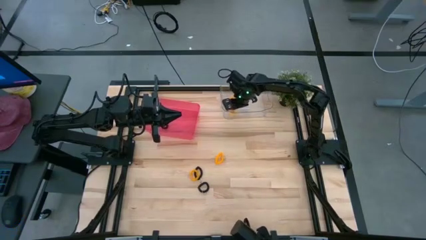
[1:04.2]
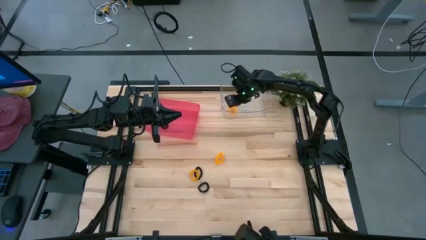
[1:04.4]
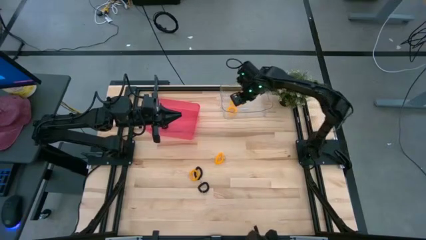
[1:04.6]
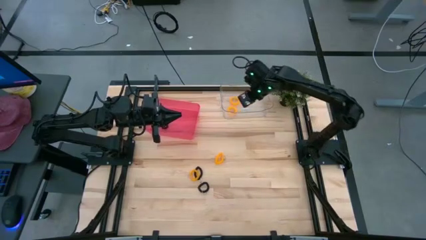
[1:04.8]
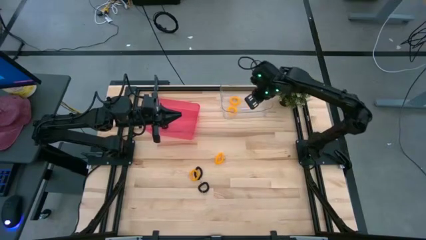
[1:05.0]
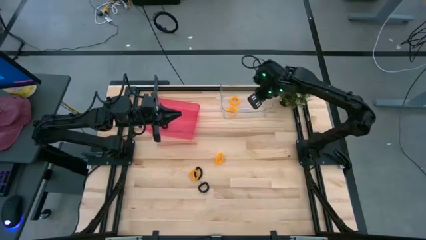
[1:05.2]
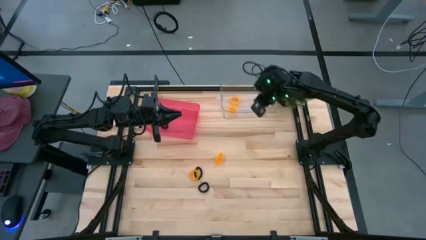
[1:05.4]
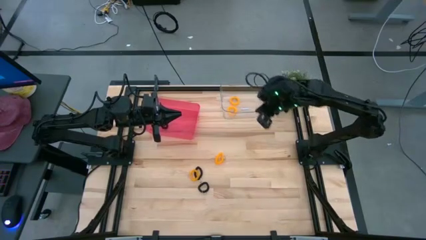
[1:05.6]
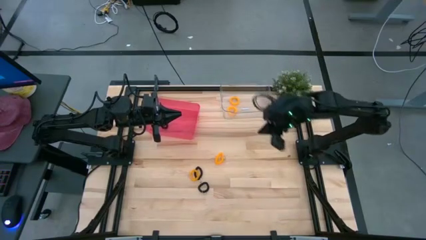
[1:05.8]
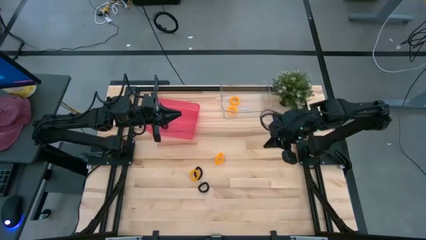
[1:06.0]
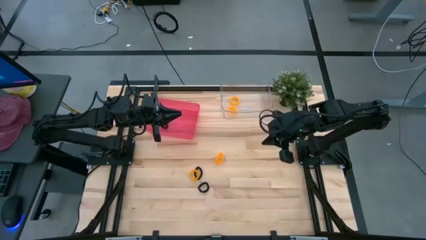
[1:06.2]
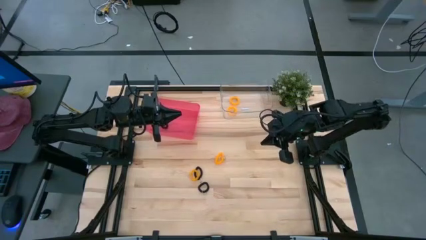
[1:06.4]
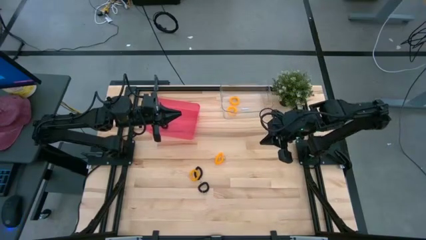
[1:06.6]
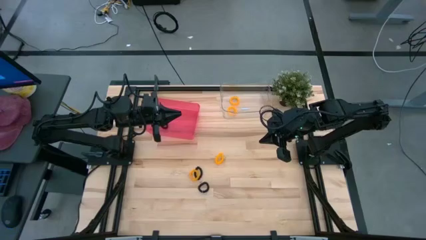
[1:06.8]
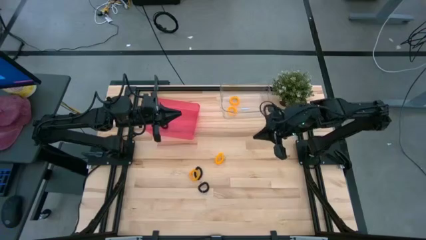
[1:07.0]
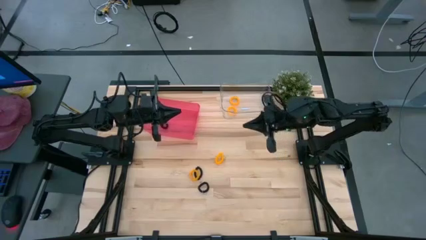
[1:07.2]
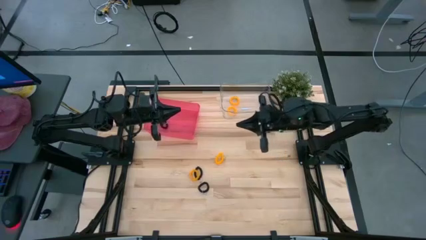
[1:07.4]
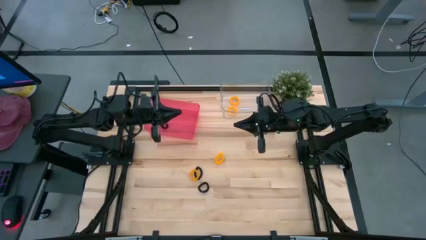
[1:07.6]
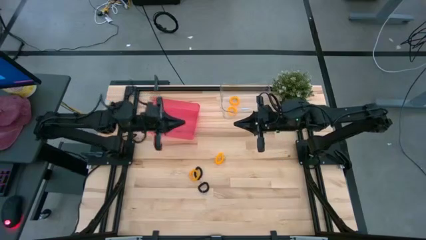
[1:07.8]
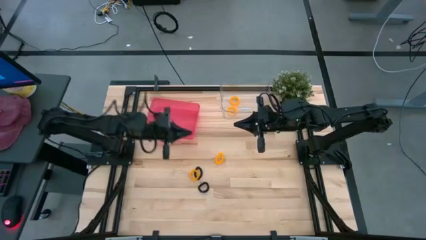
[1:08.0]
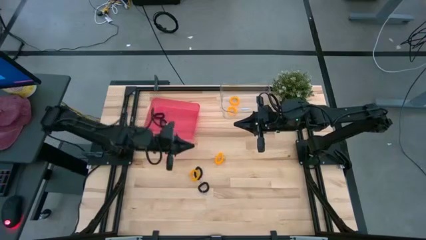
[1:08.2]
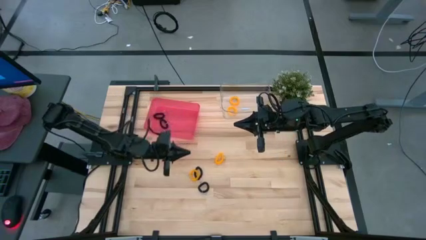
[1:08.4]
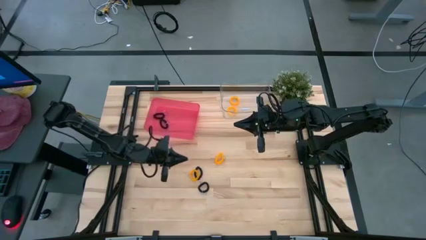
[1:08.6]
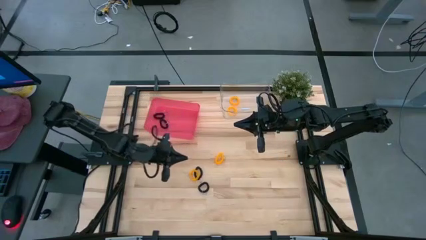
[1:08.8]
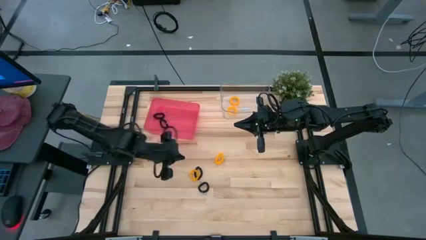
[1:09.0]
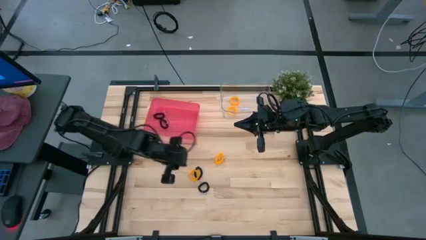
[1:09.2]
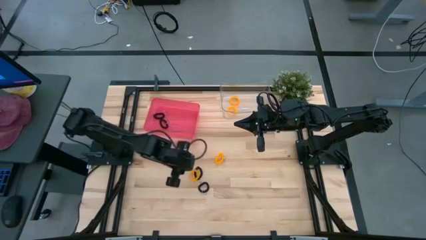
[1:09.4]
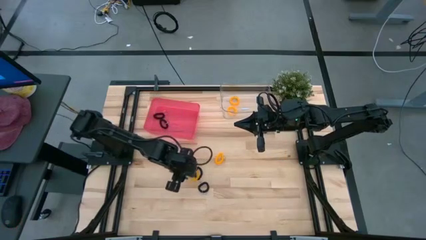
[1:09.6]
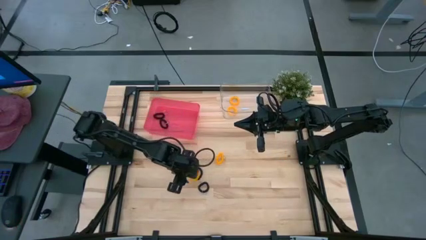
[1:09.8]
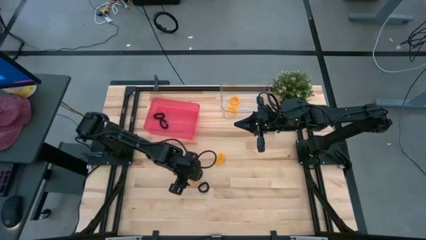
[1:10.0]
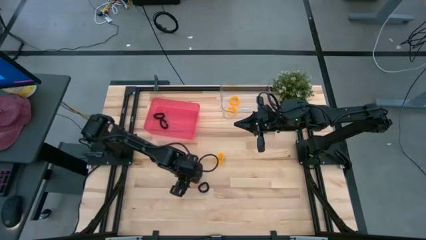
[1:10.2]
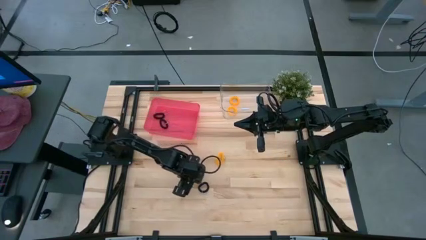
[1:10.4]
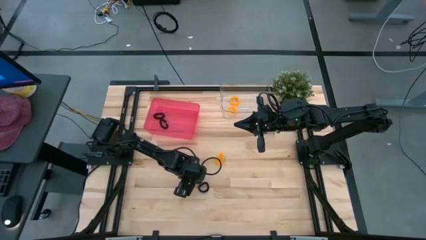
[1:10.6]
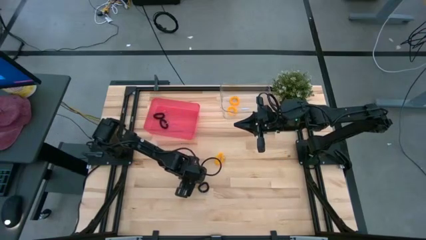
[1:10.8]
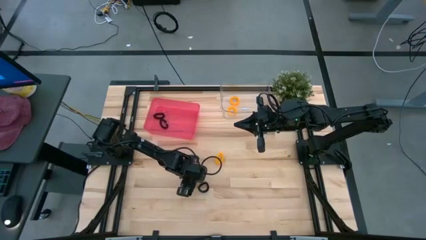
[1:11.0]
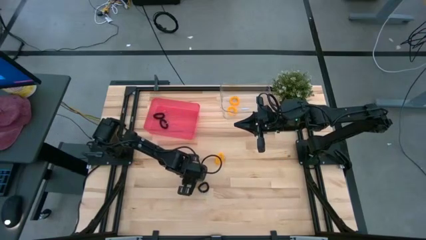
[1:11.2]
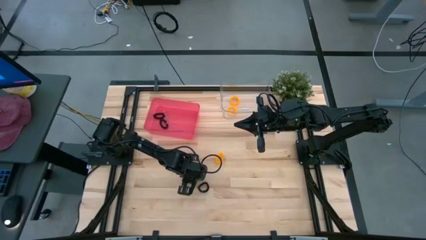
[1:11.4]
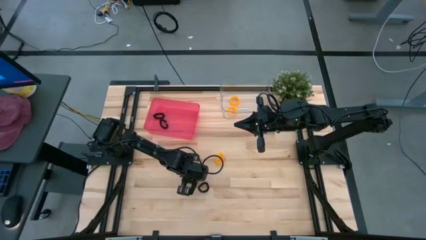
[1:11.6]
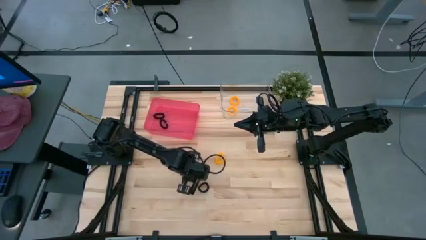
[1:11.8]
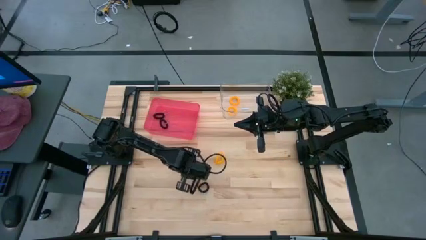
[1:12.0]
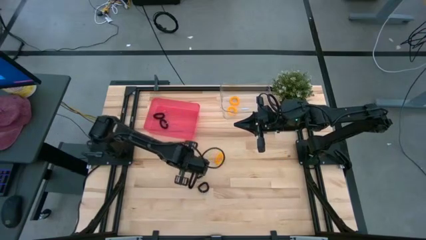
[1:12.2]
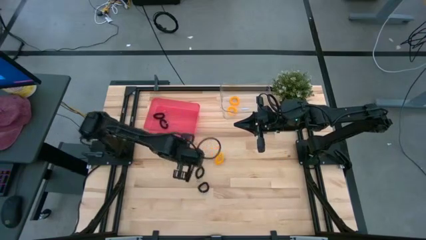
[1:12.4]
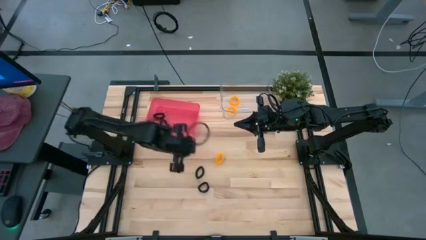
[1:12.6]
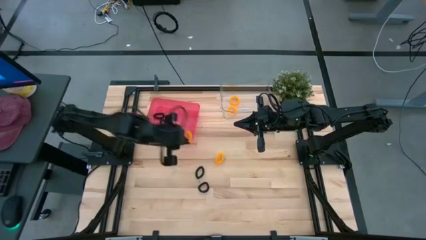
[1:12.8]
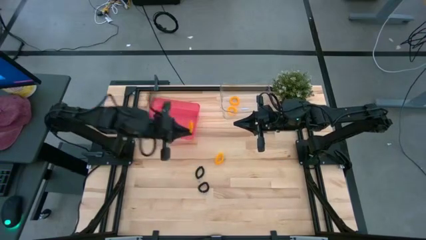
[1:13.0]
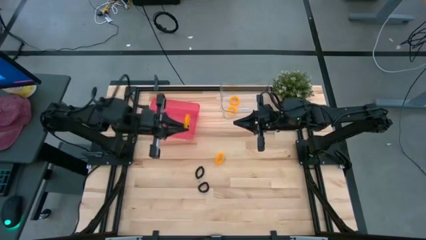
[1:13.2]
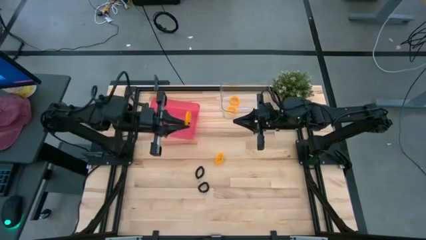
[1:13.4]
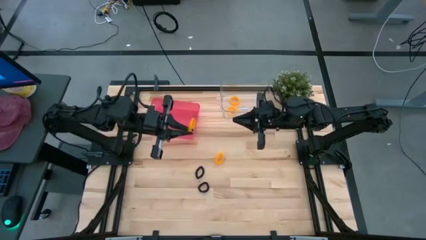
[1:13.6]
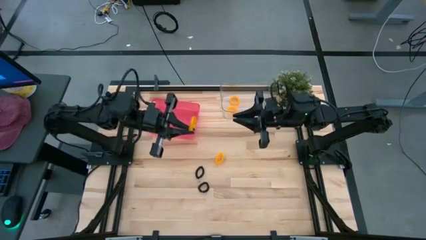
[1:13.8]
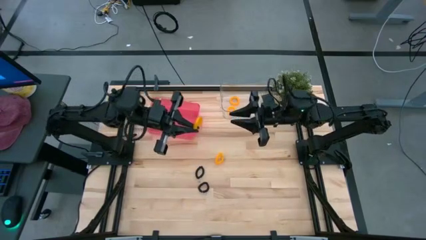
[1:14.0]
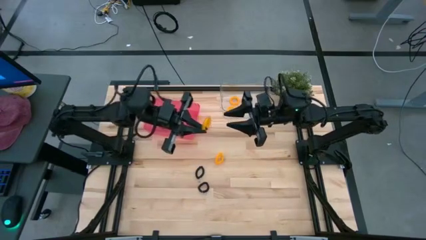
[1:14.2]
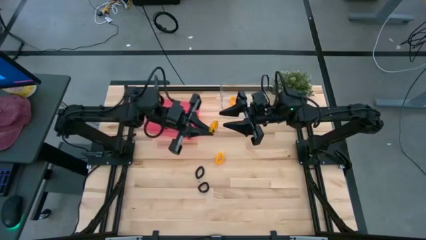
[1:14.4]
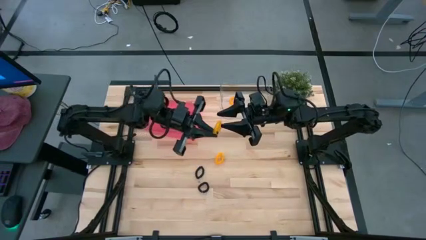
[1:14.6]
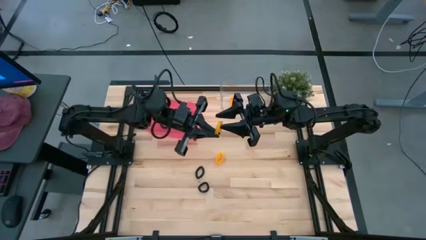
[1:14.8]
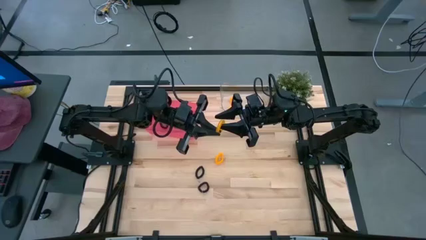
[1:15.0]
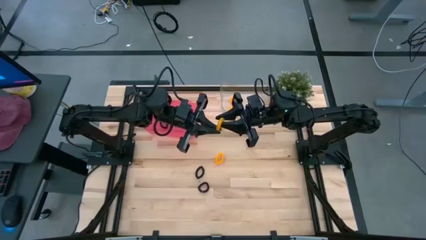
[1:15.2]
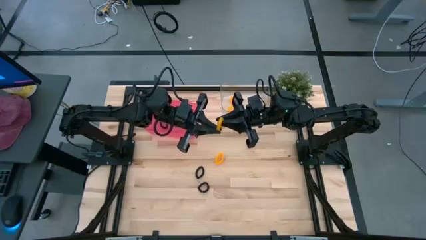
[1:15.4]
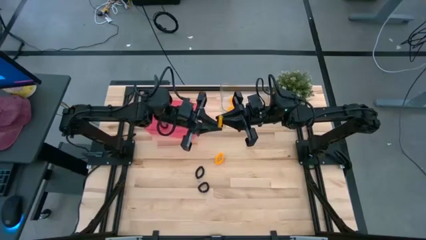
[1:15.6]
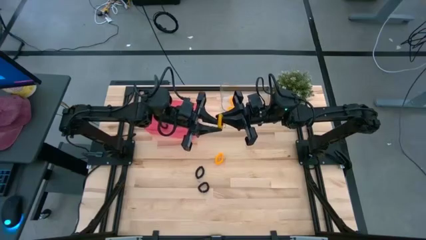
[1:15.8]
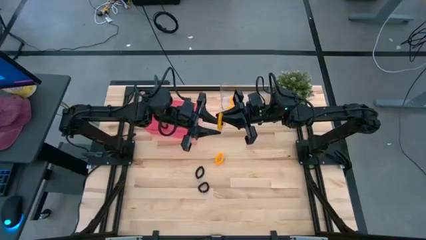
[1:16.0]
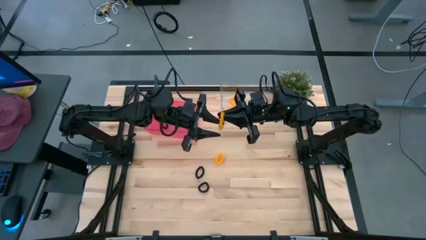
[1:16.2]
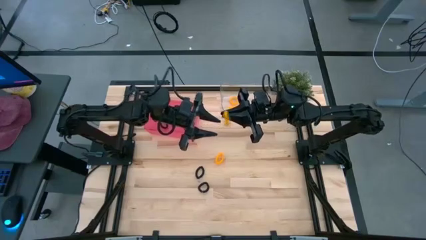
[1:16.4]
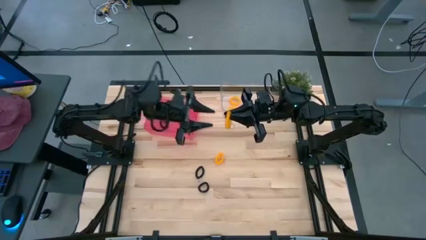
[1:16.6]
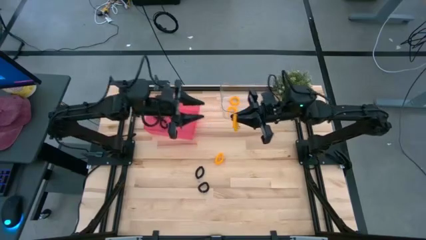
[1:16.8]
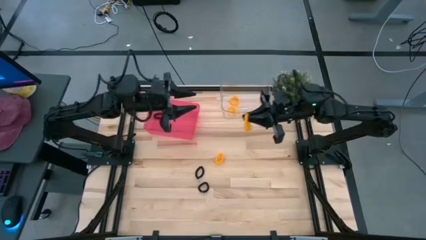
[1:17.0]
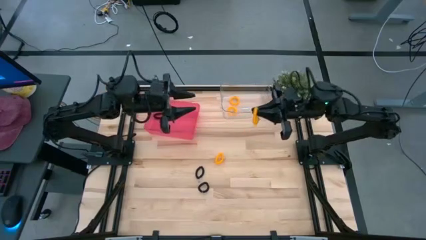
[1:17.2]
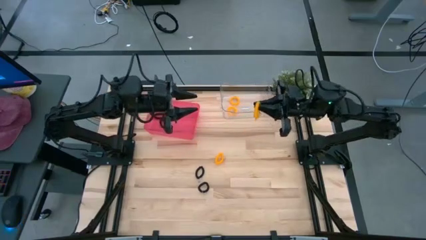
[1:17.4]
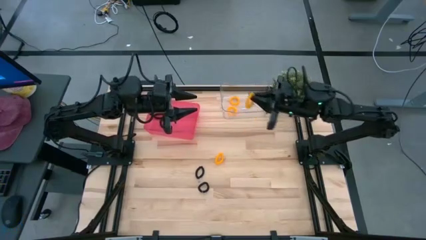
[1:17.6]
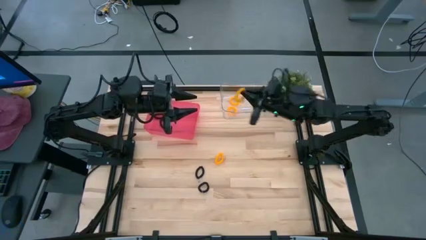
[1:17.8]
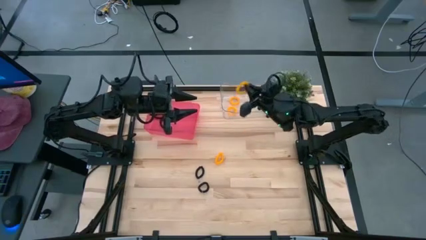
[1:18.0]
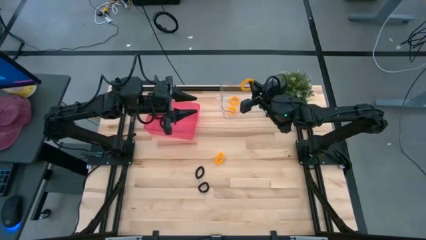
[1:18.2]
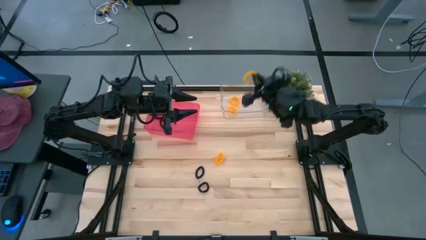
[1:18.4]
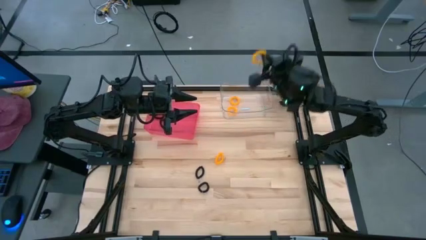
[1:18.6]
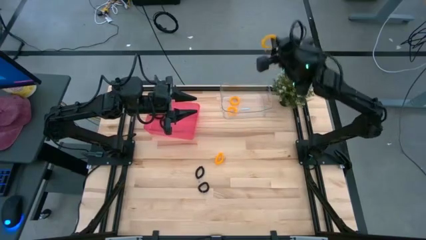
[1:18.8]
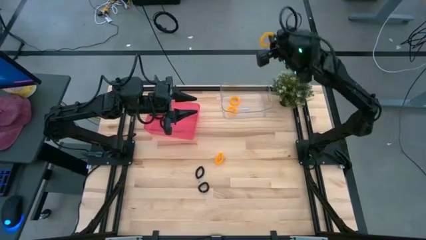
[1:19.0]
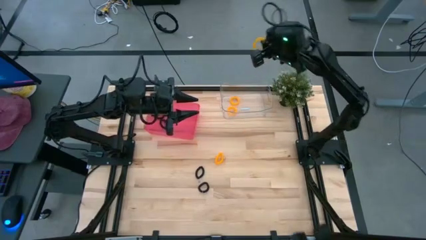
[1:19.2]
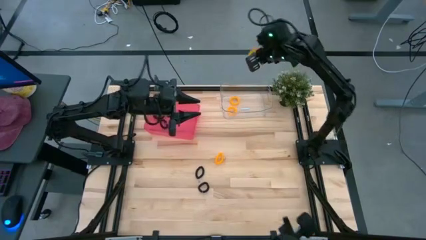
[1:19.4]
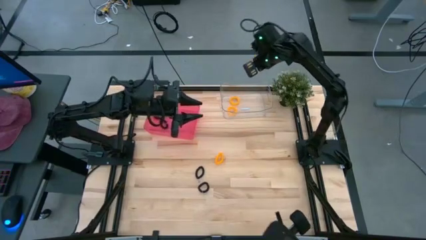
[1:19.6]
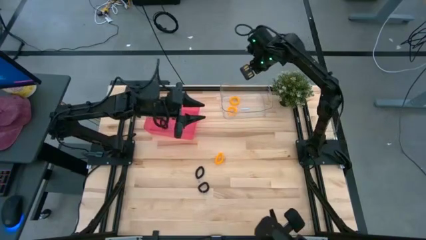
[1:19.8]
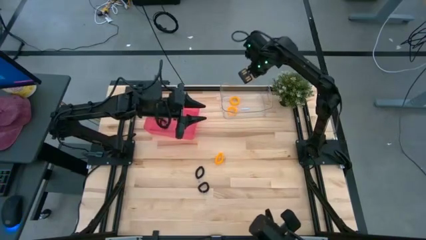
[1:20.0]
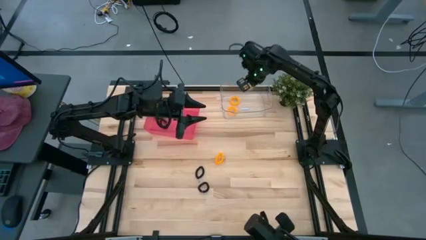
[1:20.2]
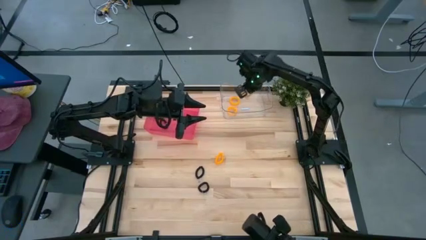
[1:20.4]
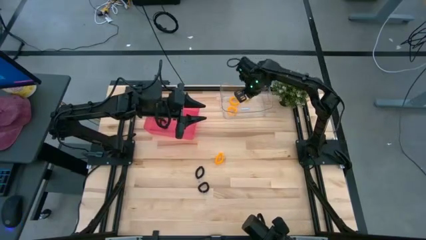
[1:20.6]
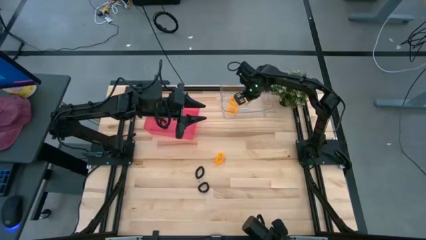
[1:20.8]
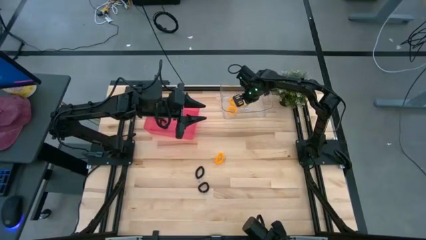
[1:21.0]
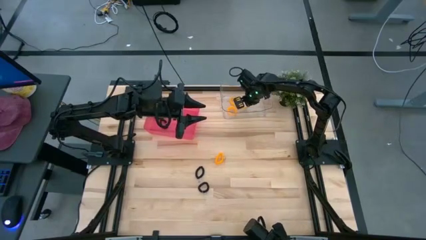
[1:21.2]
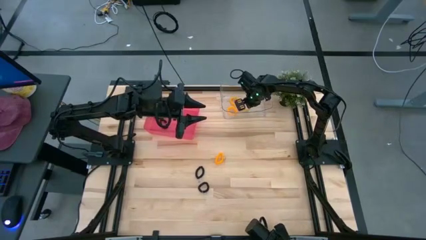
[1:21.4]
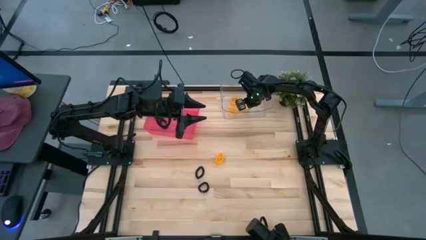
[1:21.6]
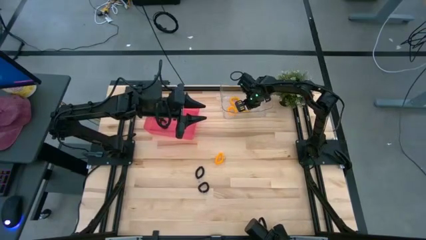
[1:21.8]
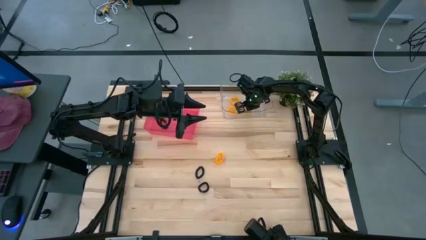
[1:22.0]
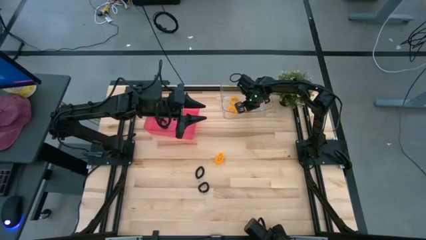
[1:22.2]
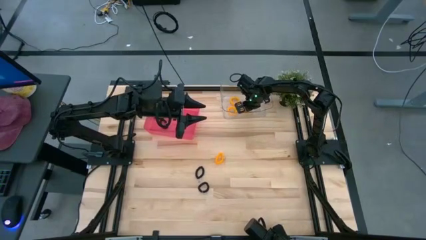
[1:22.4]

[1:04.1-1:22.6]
Task: Sort spring keychains
Put the yellow spring keychain into the transparent bin
